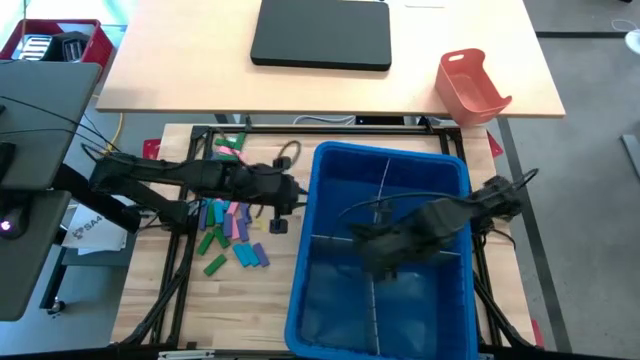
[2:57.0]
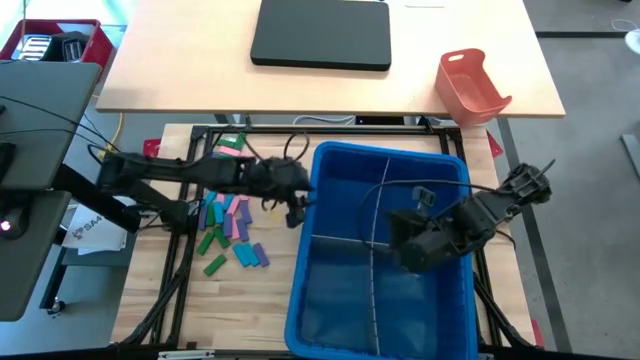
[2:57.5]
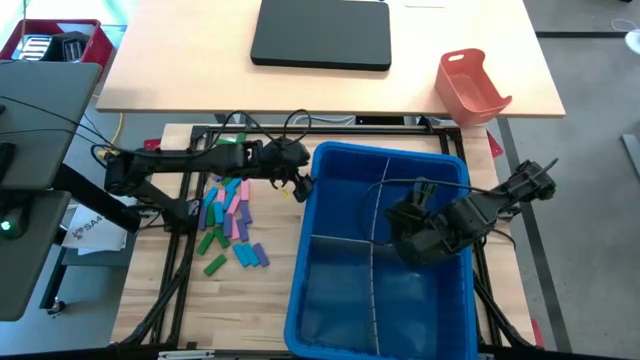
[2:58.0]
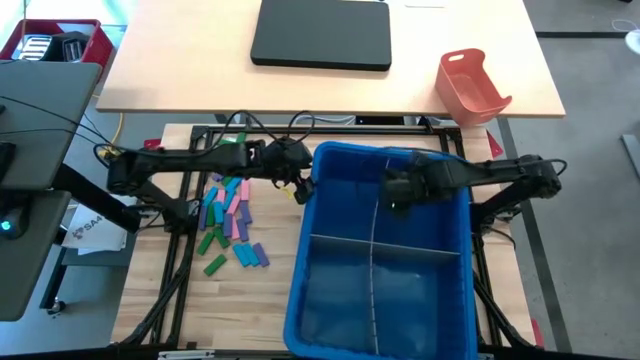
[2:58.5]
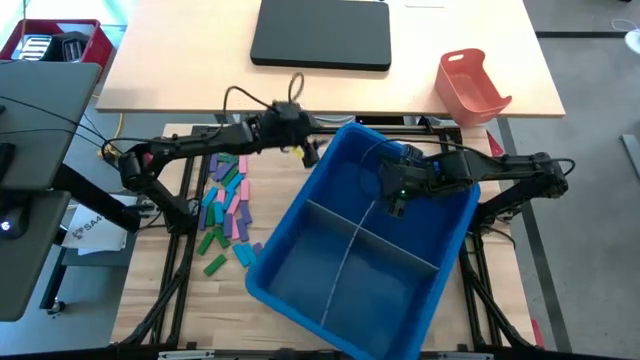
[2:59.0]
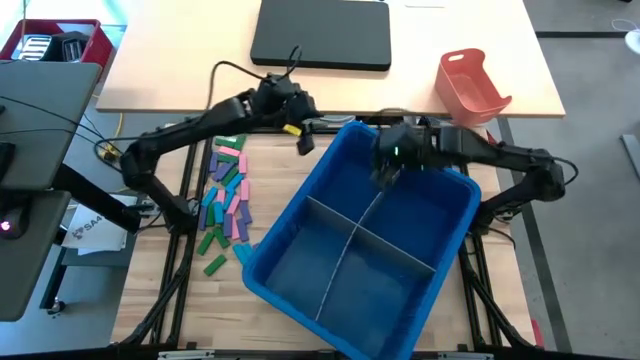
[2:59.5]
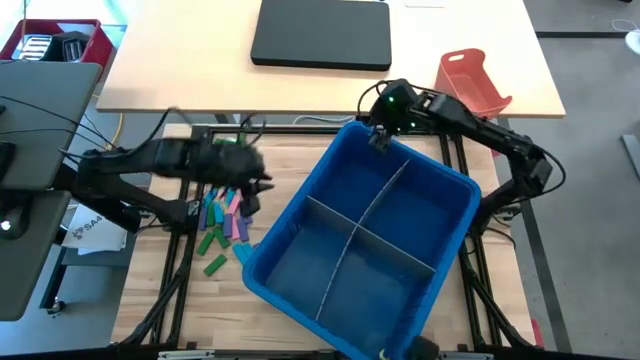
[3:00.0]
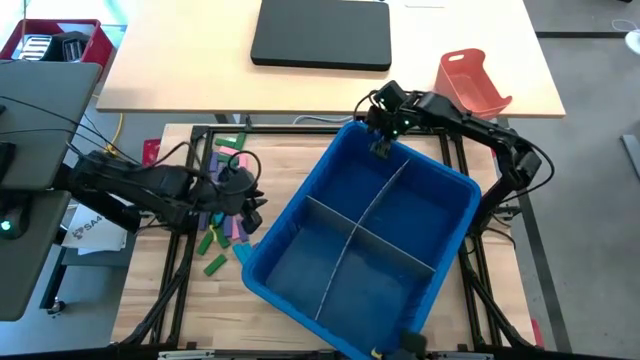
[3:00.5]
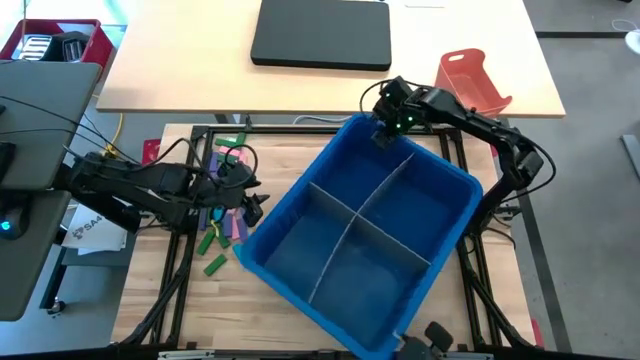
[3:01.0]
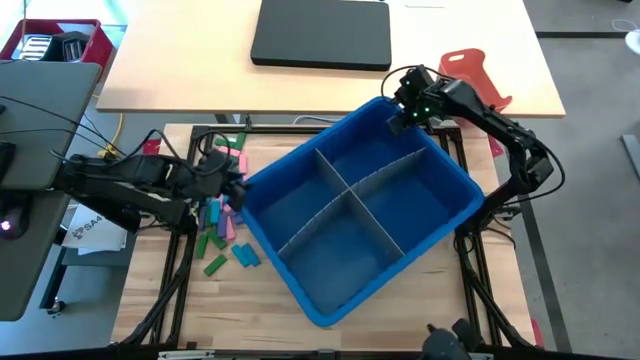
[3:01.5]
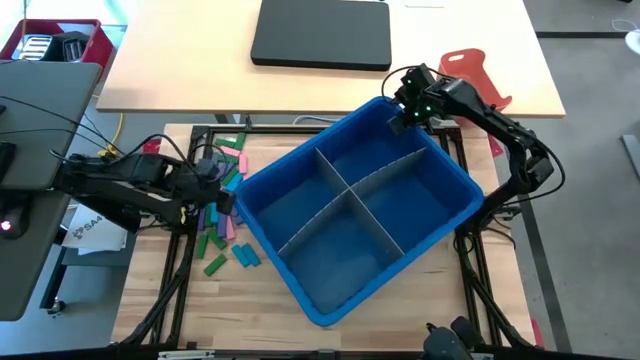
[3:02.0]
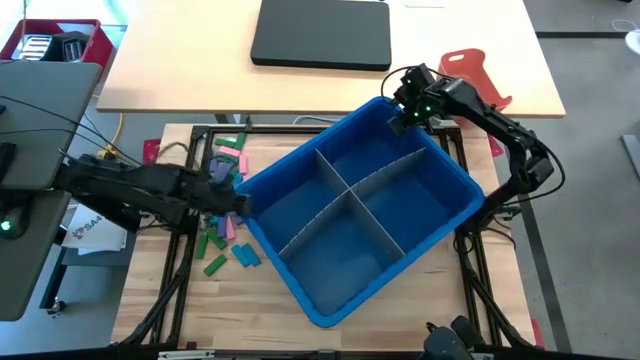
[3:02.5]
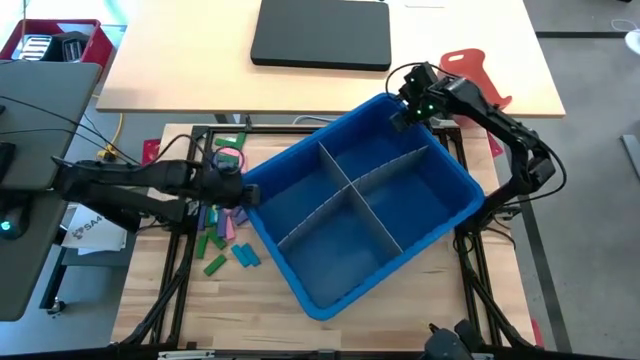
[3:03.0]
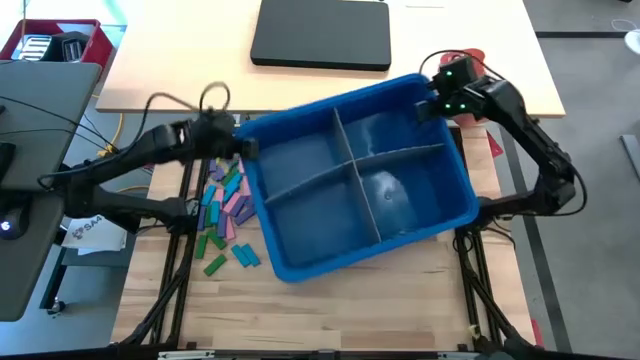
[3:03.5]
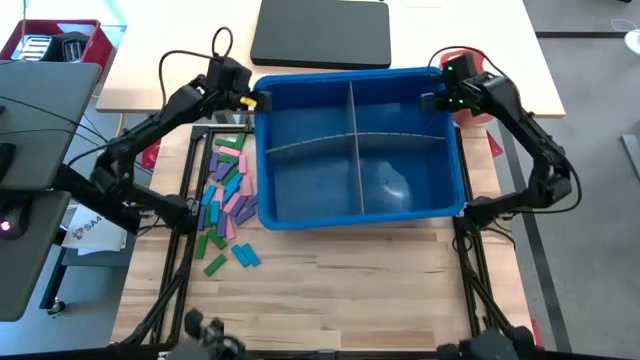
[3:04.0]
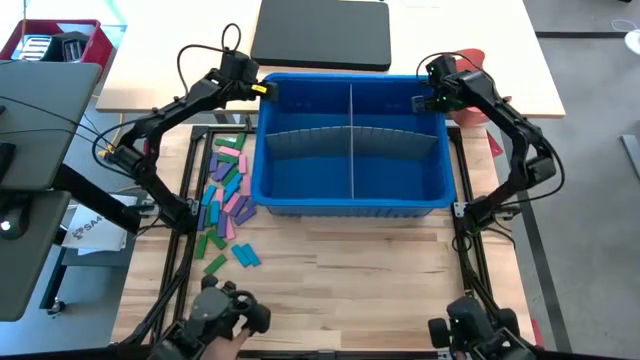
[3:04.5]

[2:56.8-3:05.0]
Task: Sort blocks
Move the blue bin to the top of the table

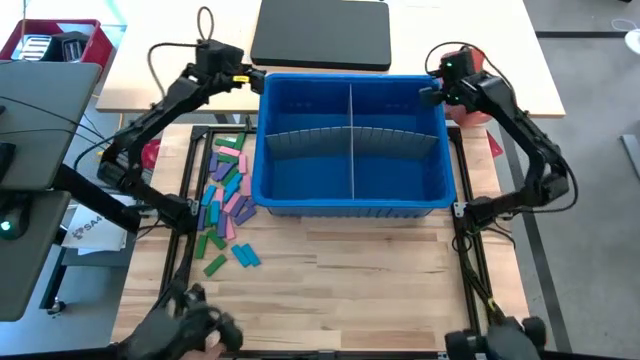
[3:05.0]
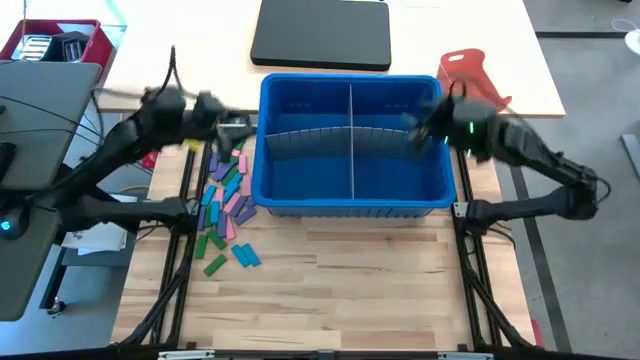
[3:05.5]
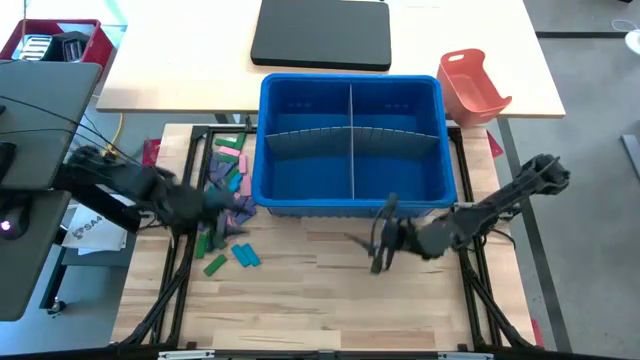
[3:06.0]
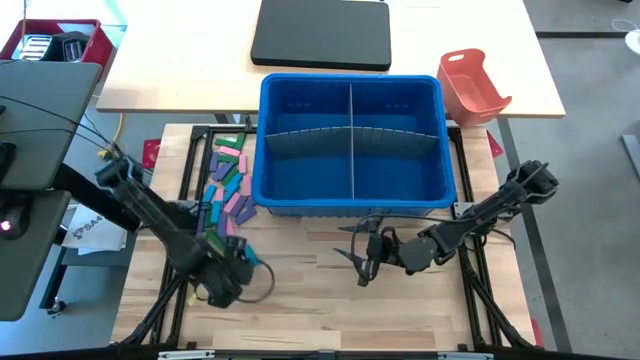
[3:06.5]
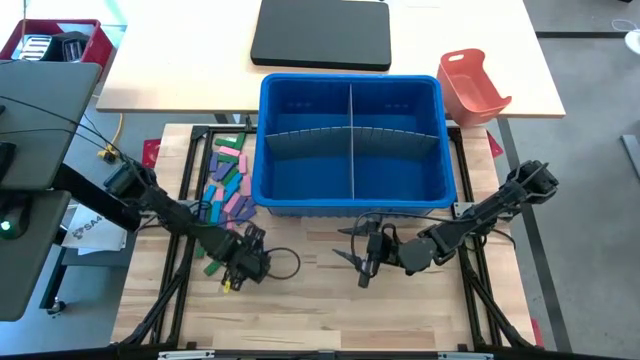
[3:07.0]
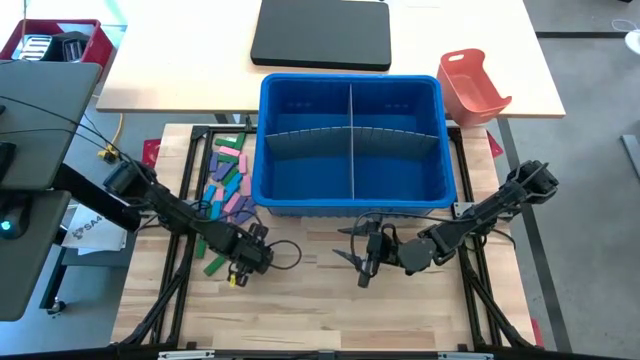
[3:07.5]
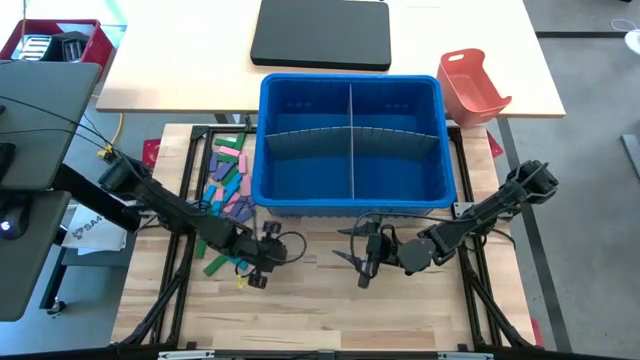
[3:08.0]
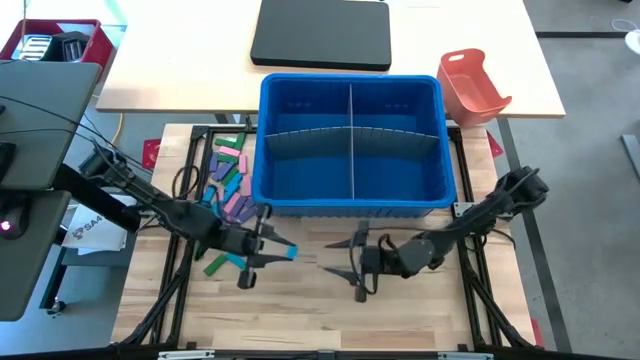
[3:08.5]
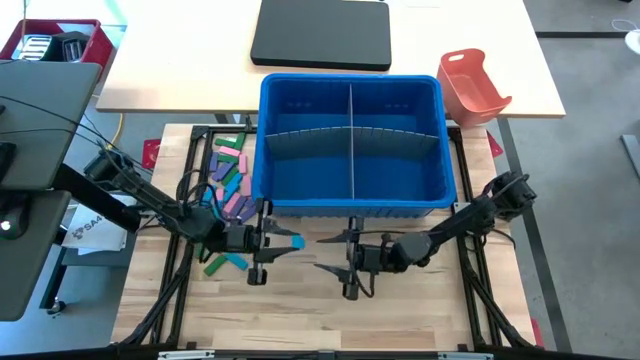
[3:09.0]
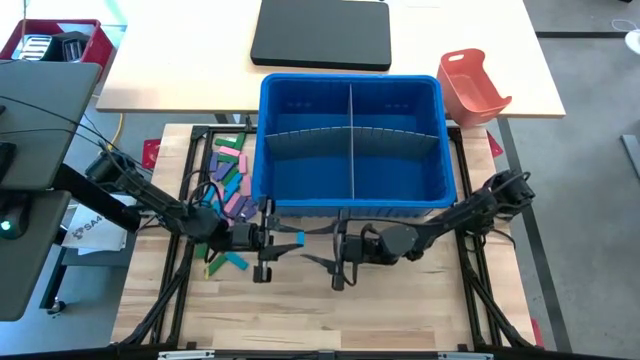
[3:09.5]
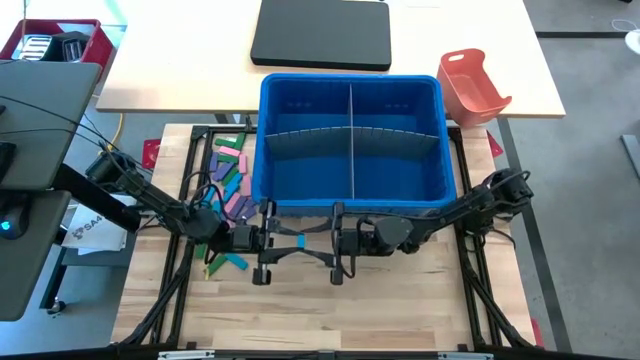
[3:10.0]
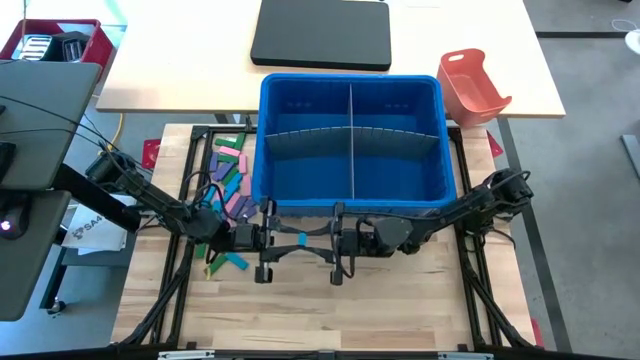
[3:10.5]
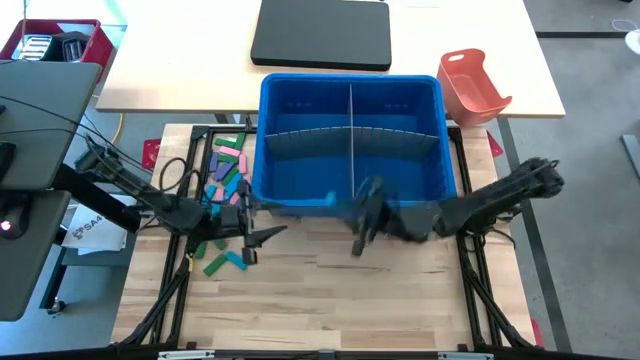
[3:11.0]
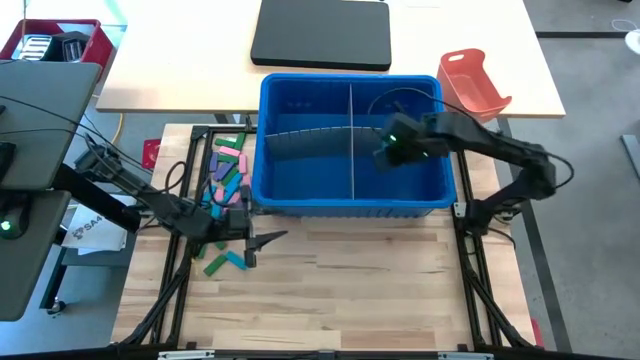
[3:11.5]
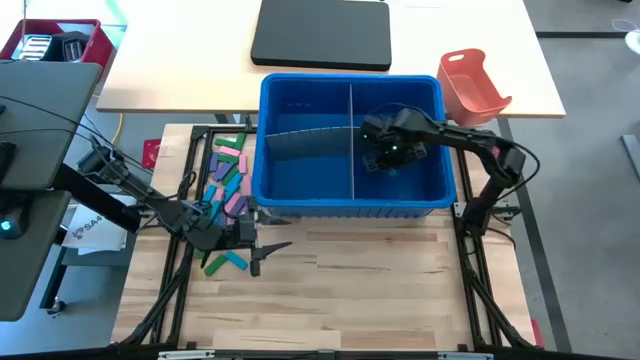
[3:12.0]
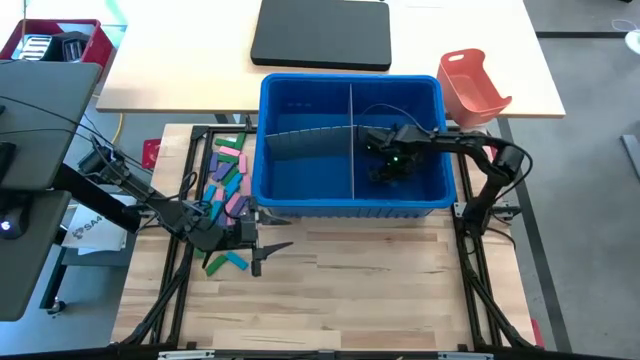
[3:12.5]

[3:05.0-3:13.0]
Put the blue block into the blue bin

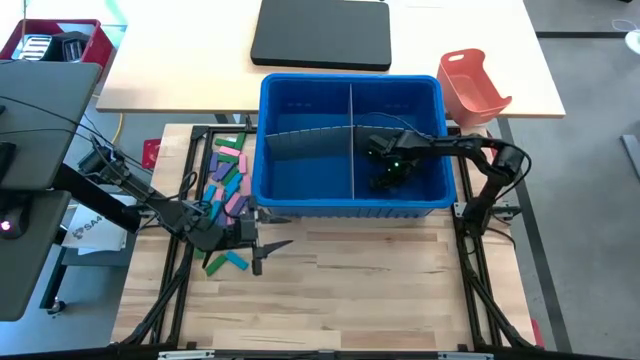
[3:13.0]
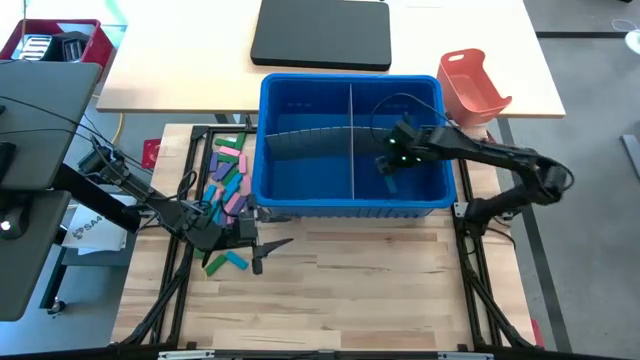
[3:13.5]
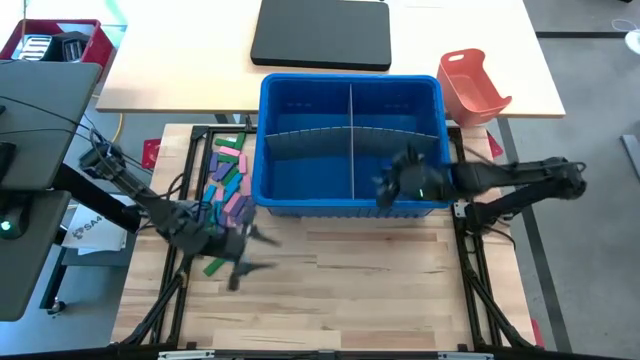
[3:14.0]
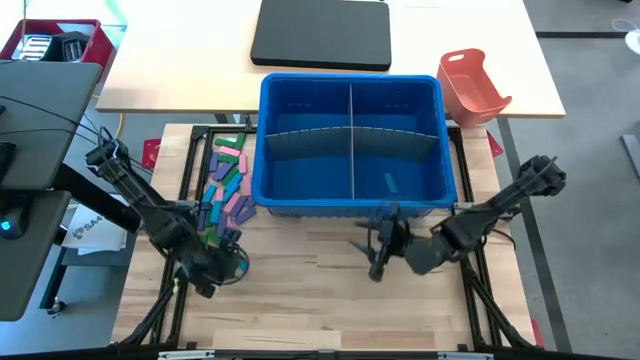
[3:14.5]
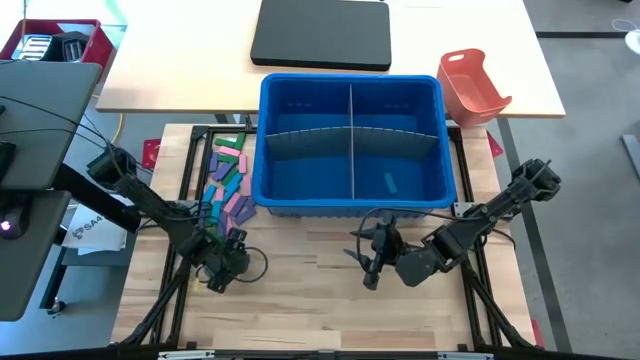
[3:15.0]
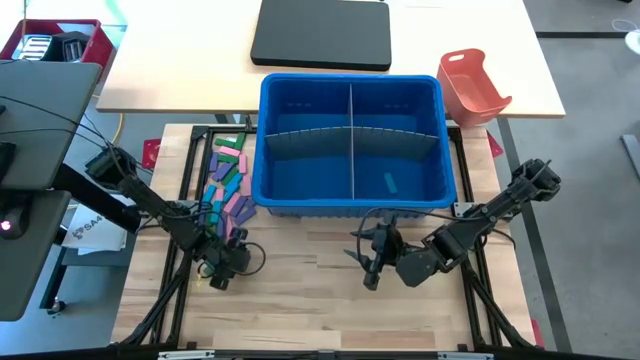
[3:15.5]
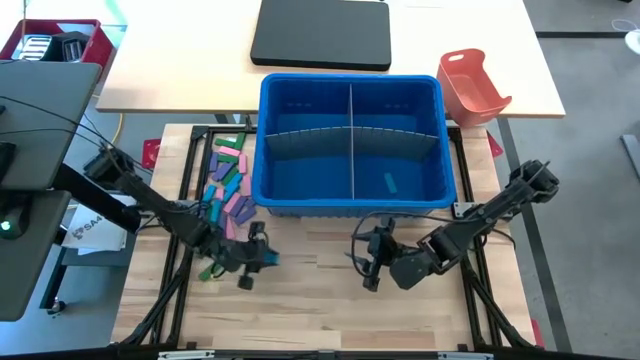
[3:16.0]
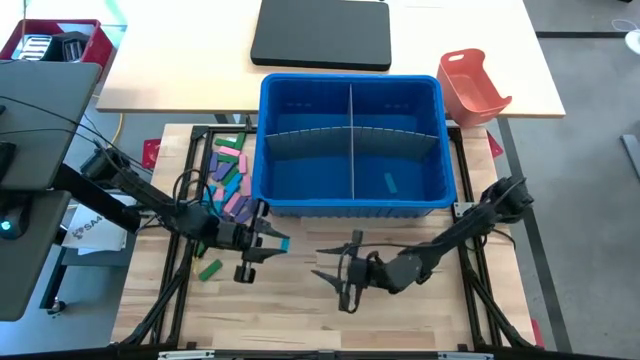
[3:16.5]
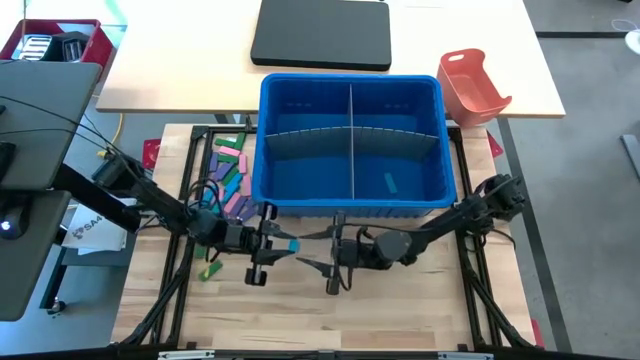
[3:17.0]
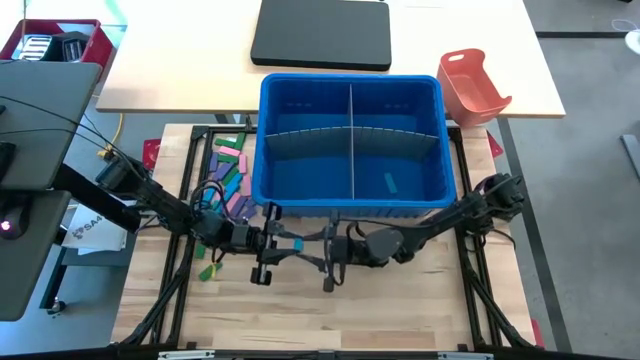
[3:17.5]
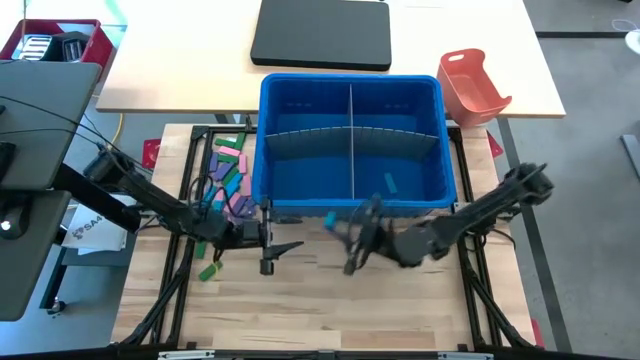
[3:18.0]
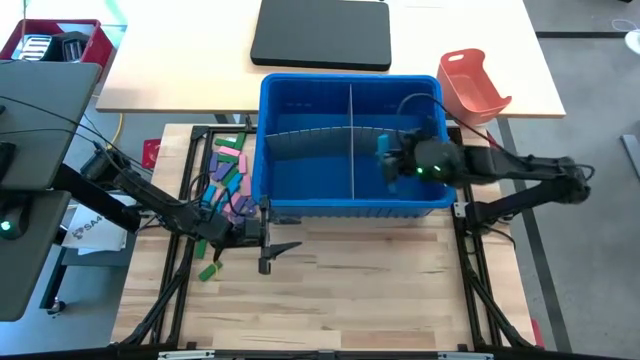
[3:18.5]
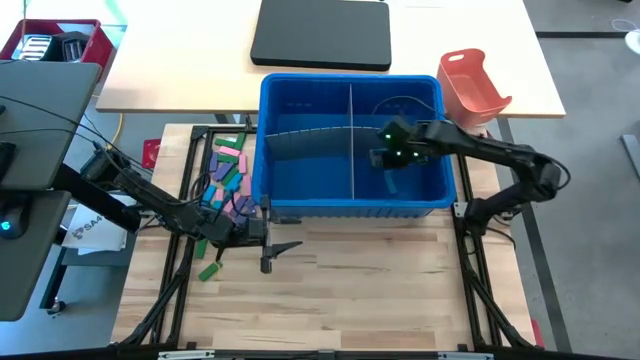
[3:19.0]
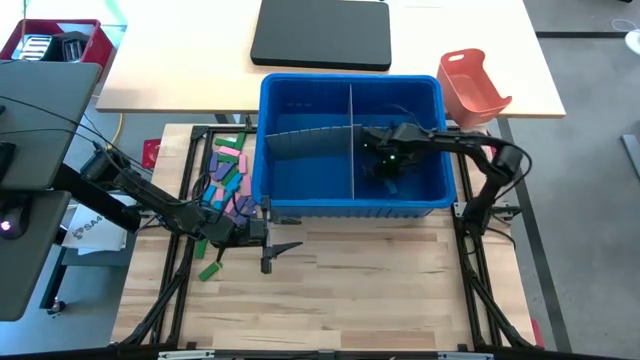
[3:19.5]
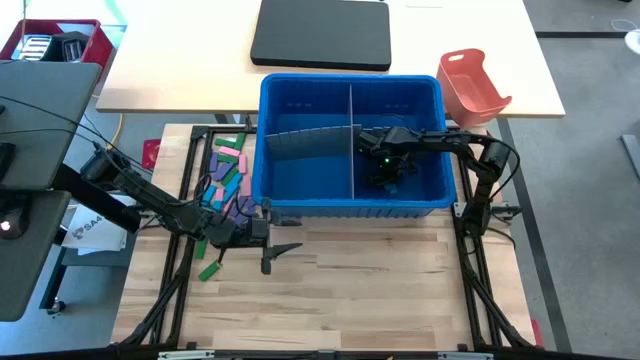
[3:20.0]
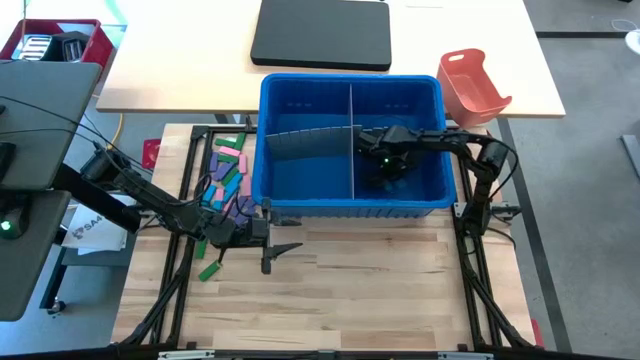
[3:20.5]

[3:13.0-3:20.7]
Put the blue block into the bottom right of the blue bin
